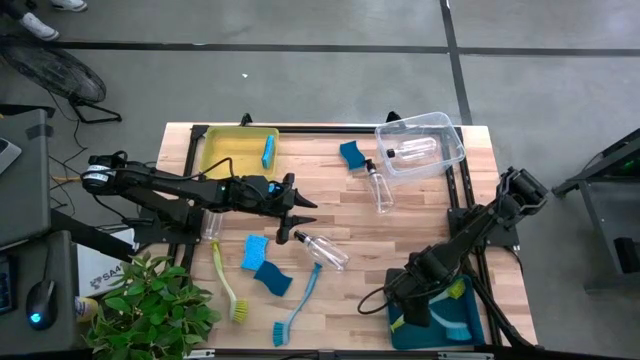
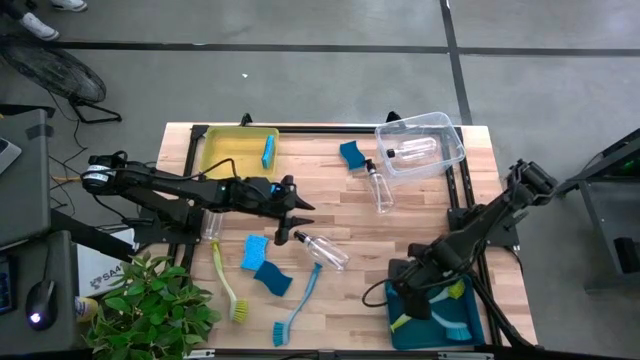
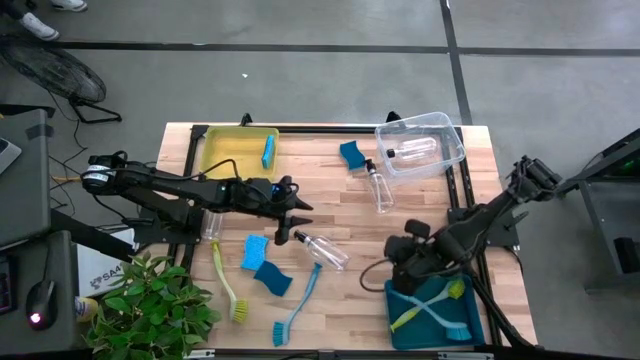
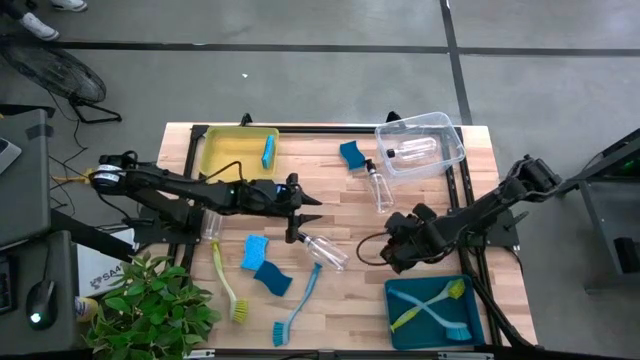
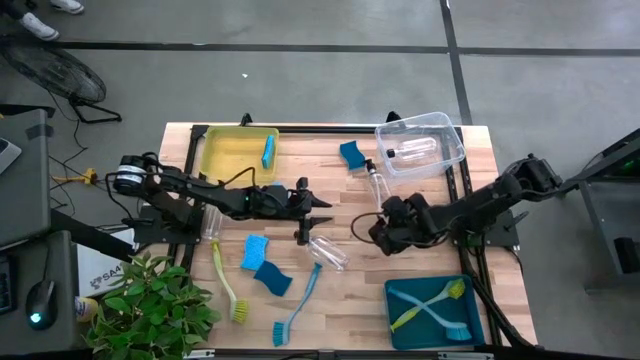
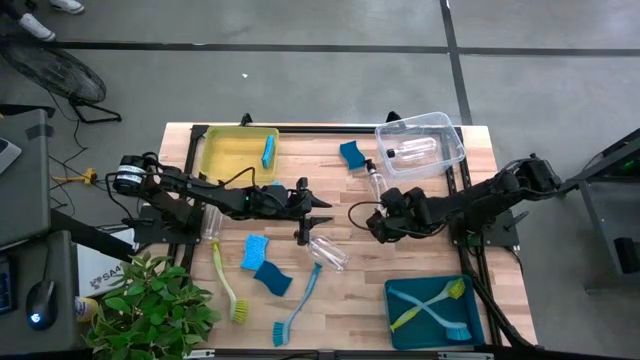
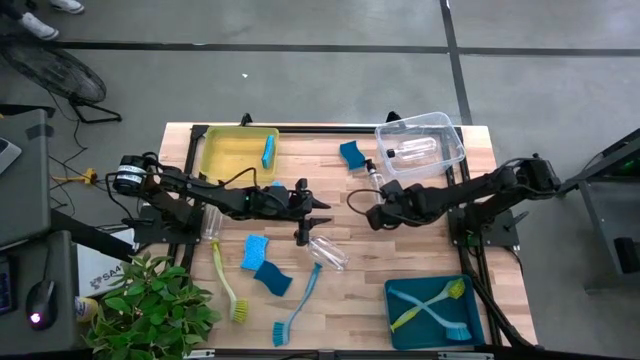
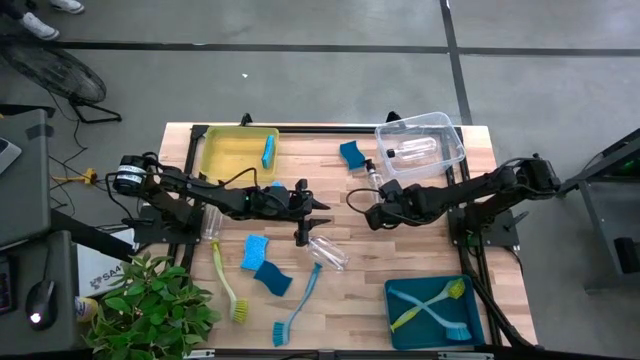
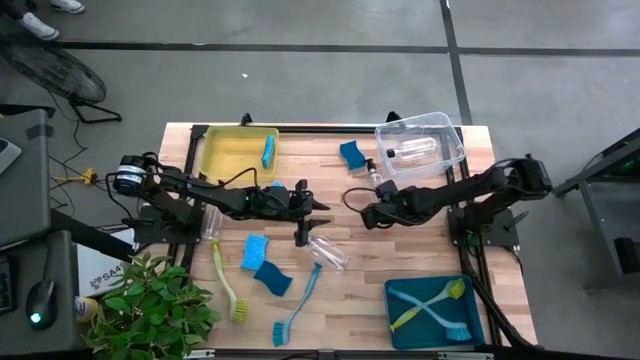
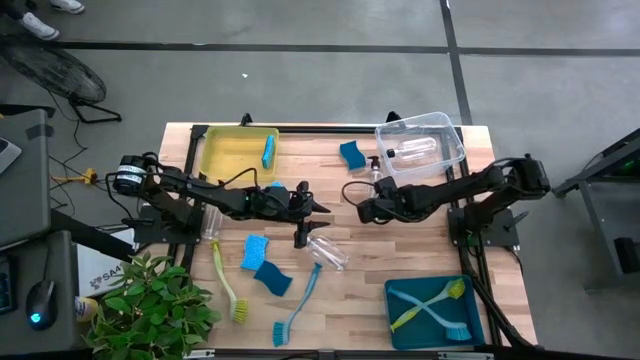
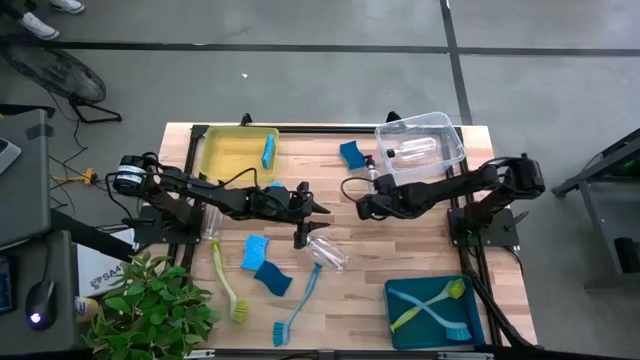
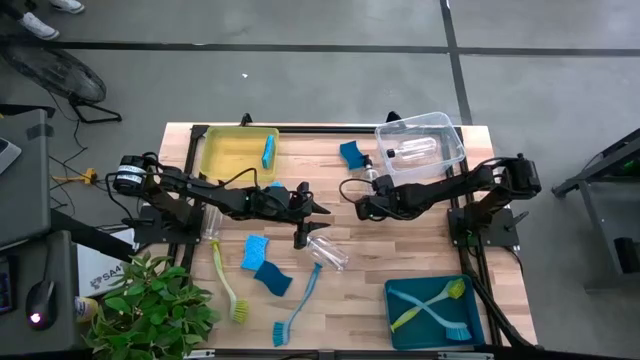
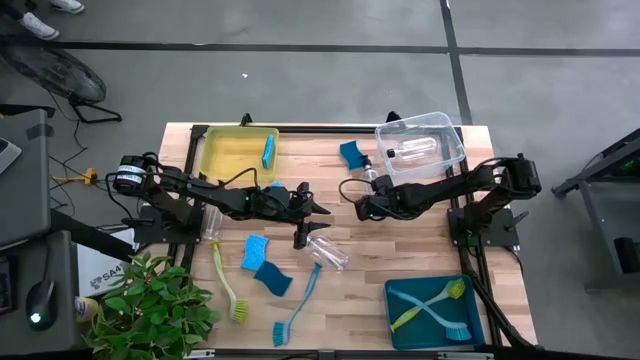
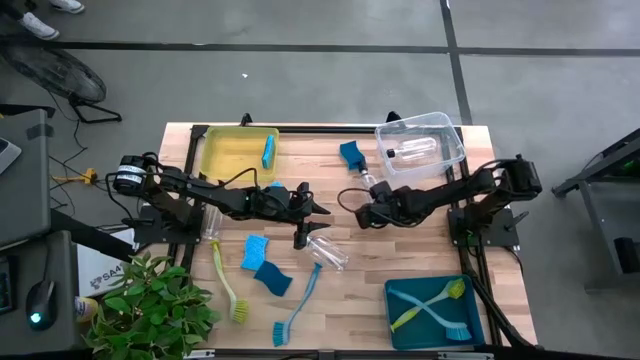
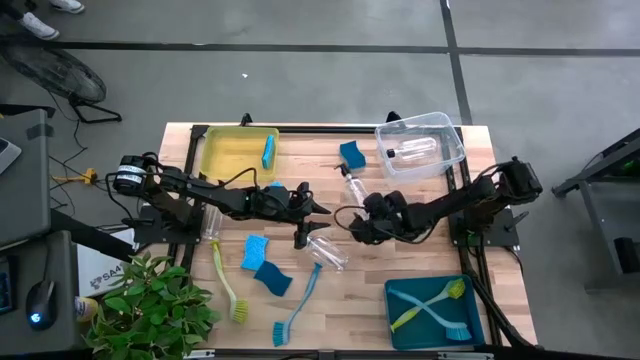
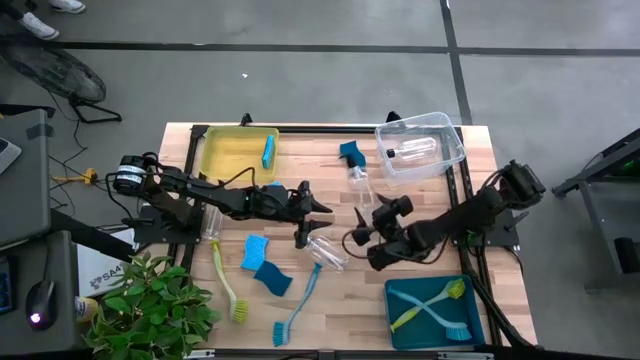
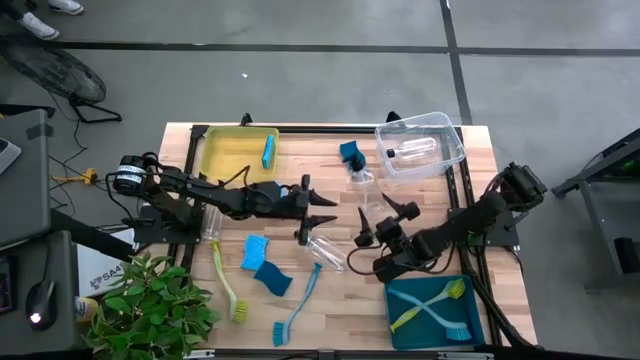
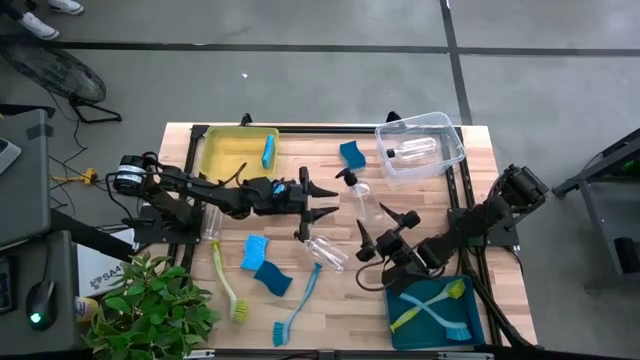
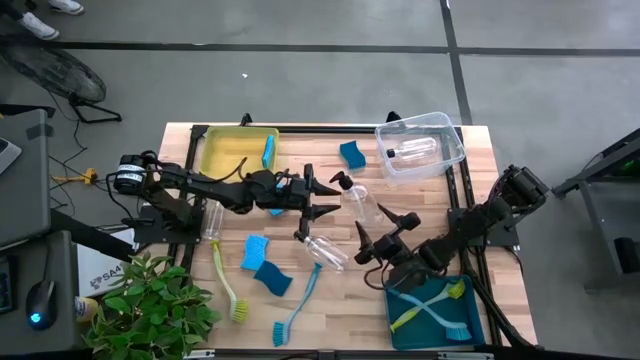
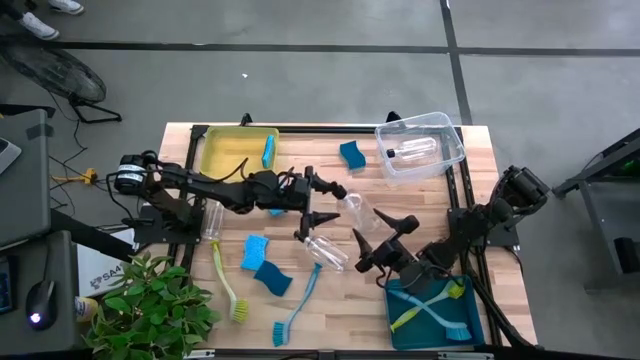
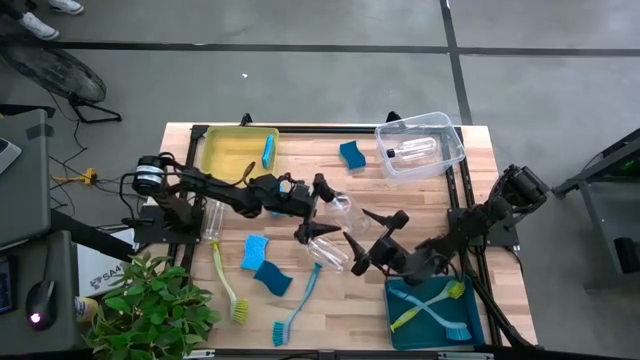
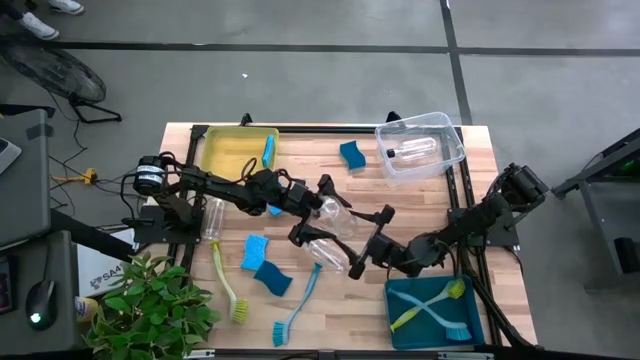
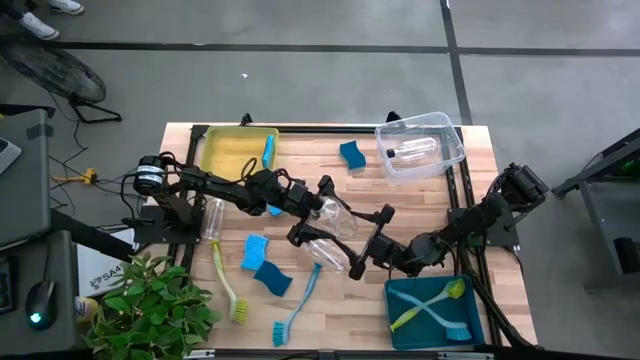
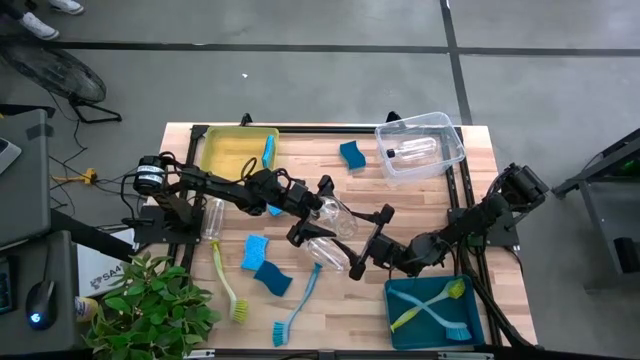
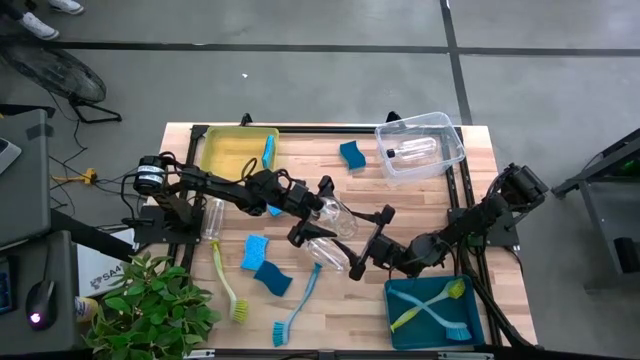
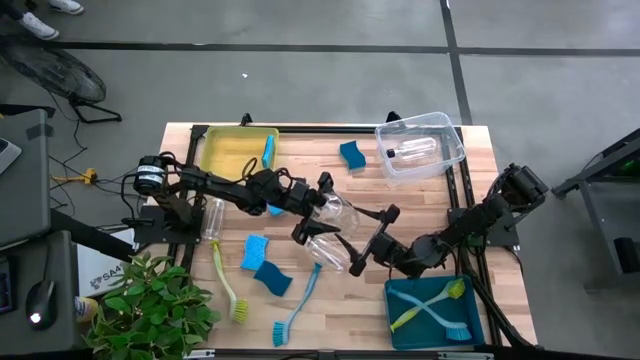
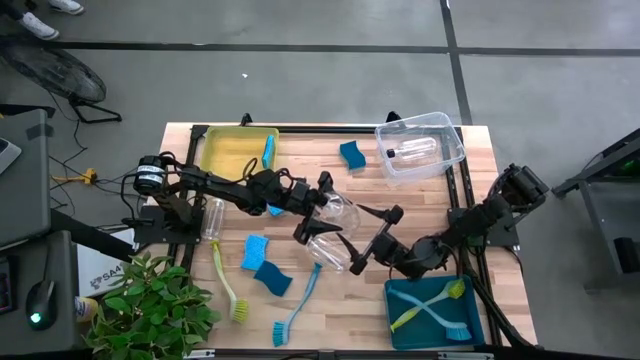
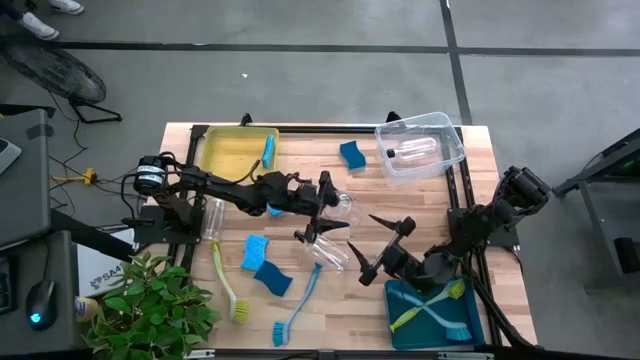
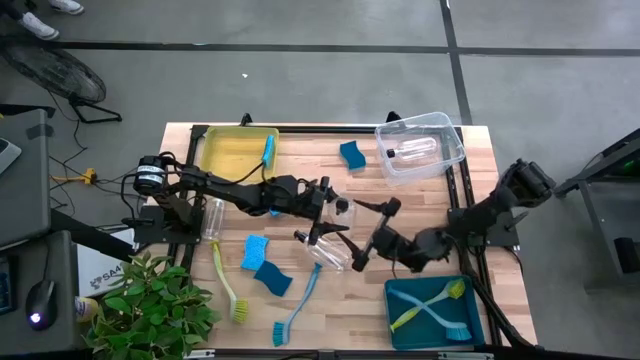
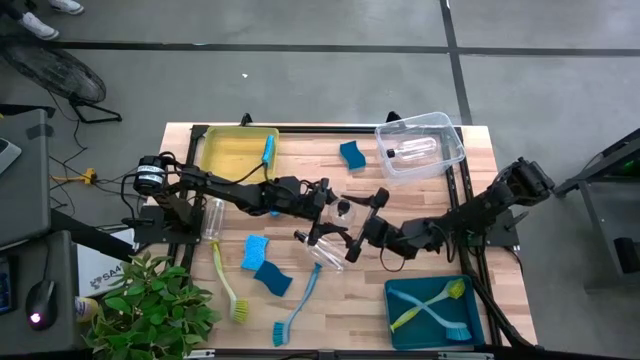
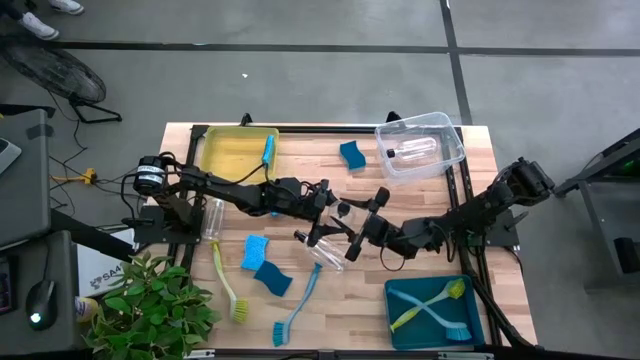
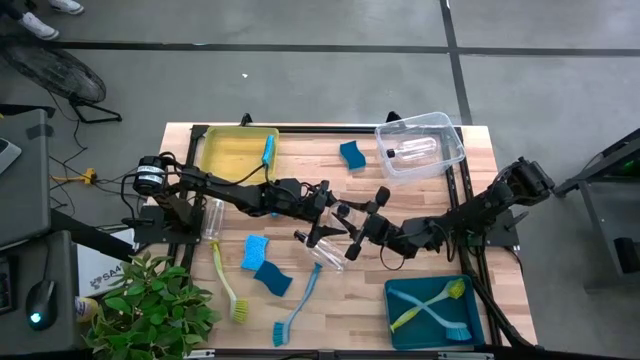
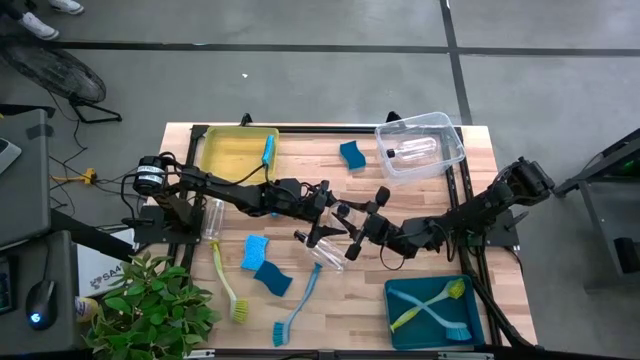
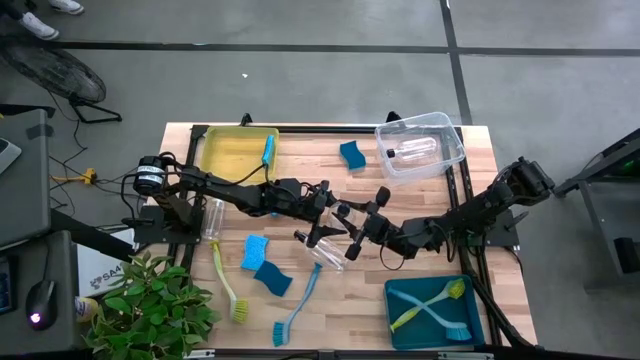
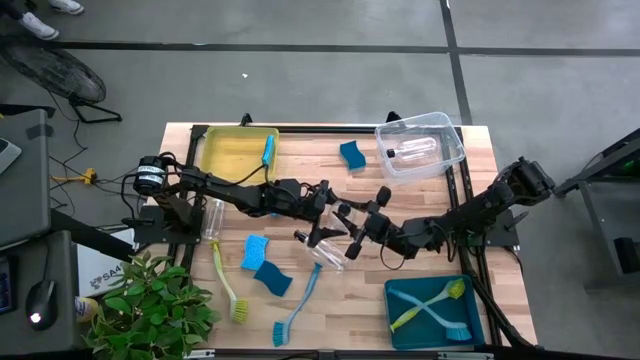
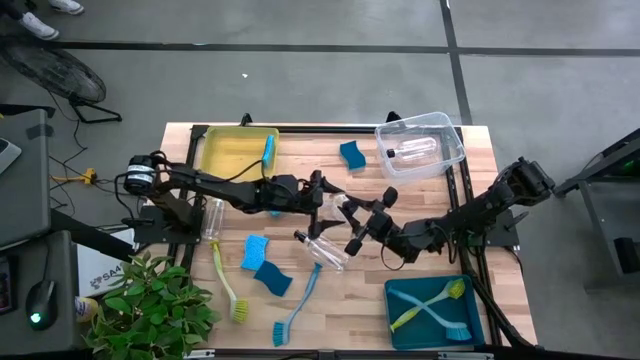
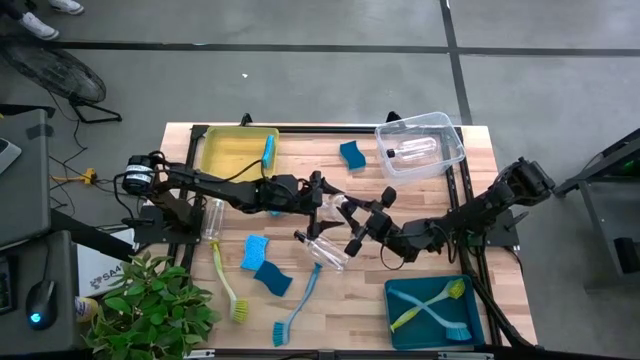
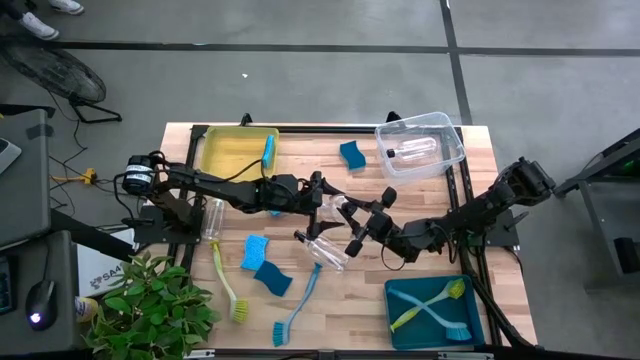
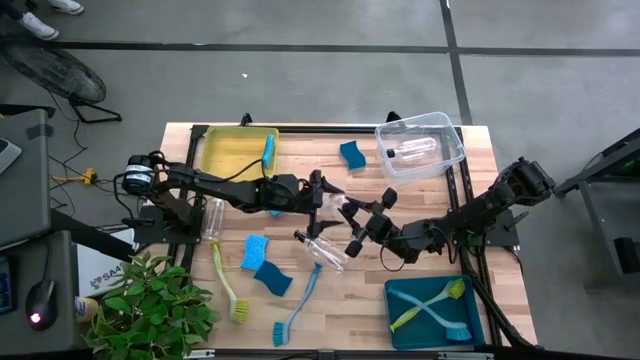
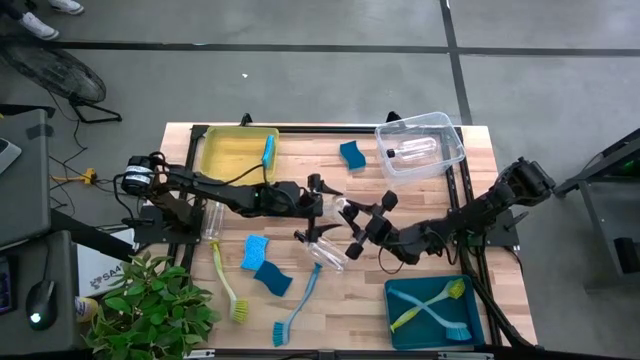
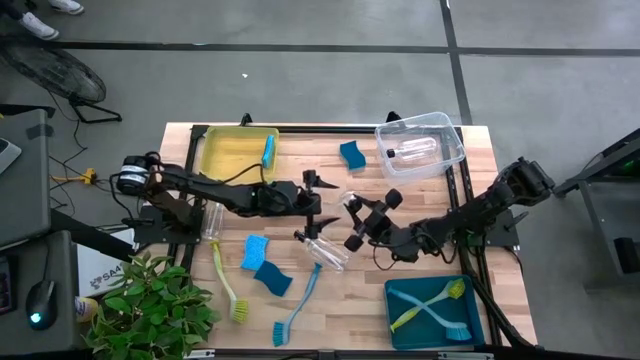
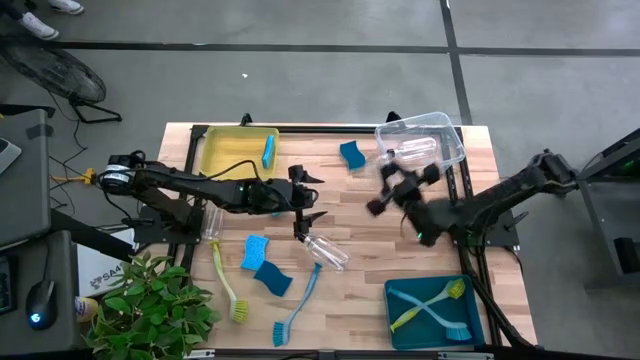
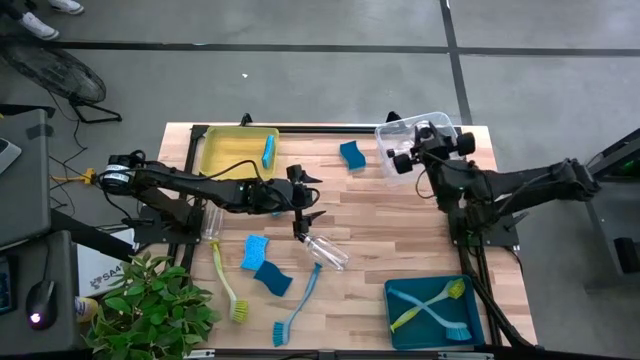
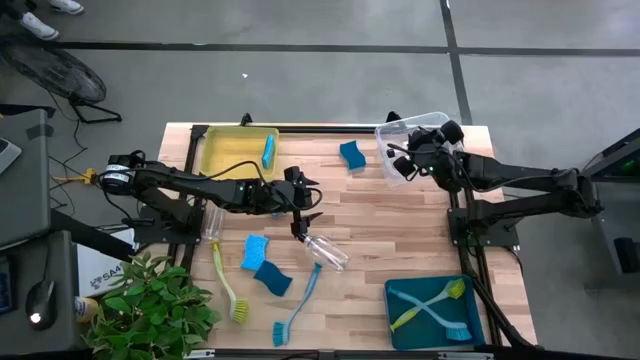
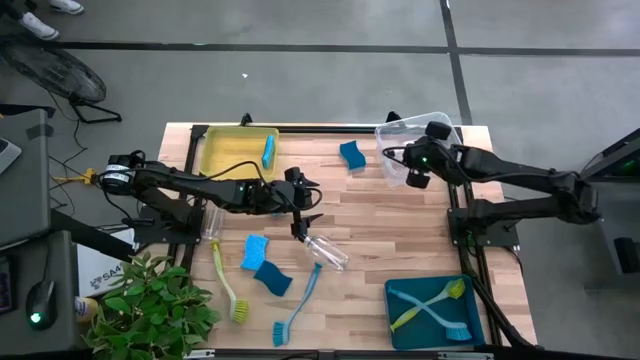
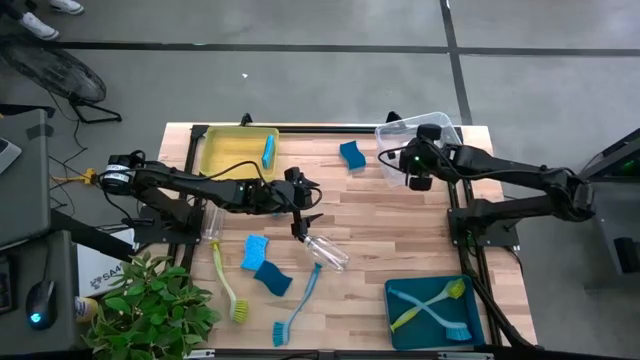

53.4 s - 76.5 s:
Task: Pick & Place Kitchen Sink Supplies
Put the transparent soap dispenser into the transparent bin
